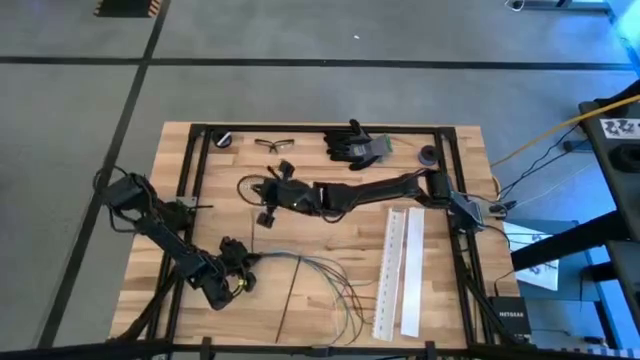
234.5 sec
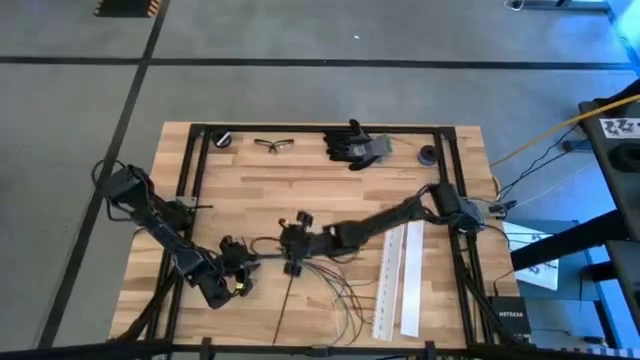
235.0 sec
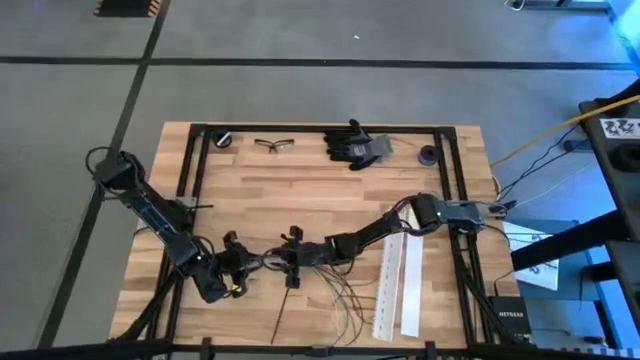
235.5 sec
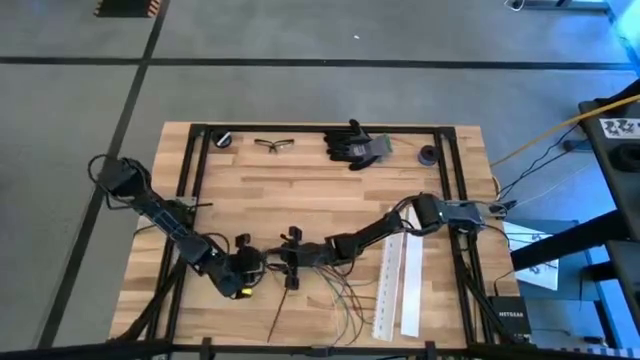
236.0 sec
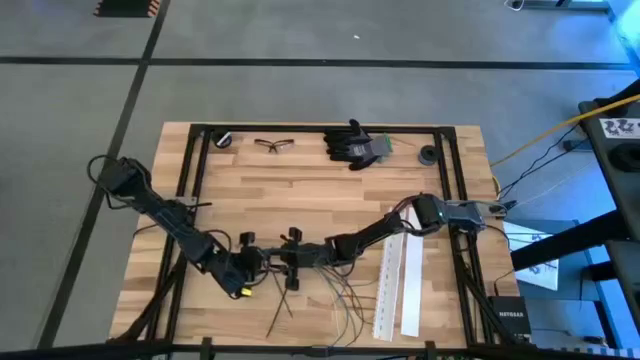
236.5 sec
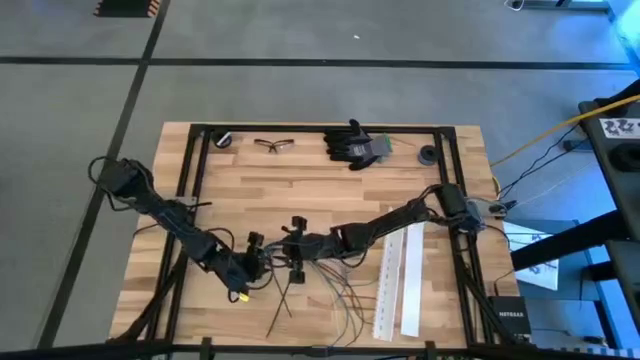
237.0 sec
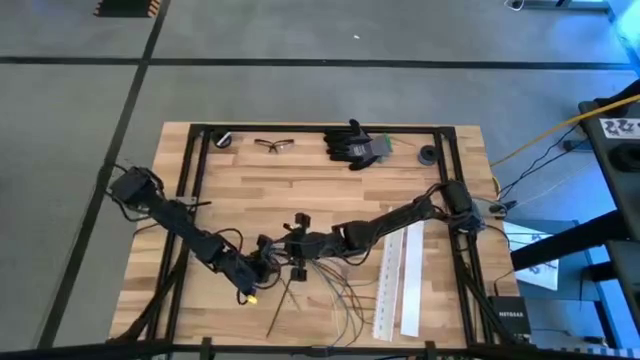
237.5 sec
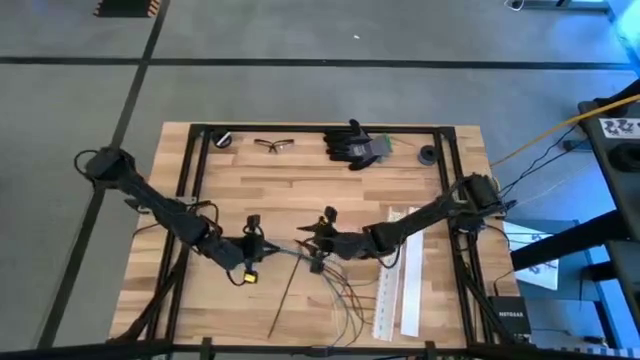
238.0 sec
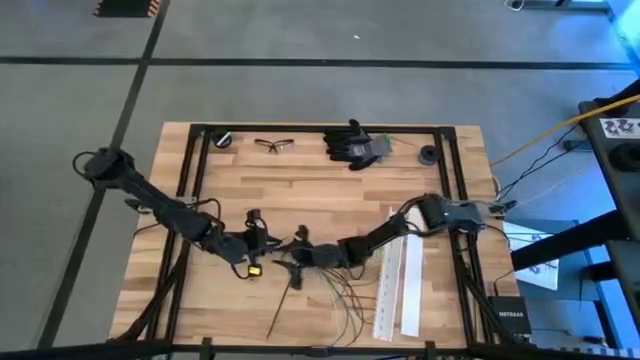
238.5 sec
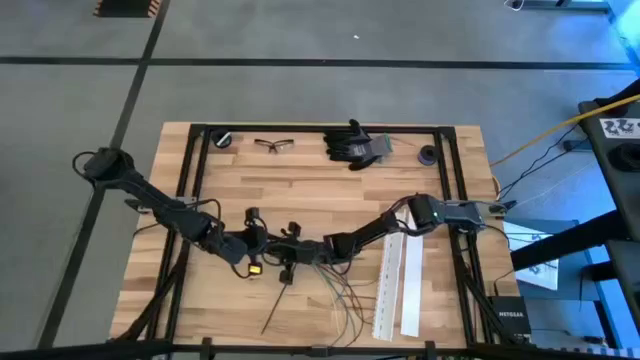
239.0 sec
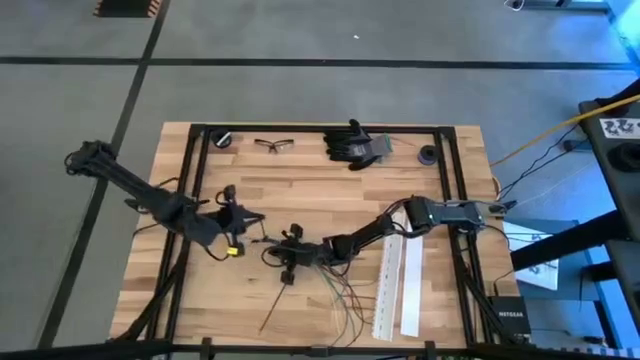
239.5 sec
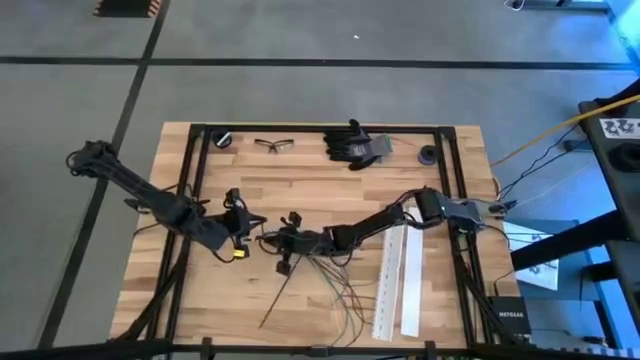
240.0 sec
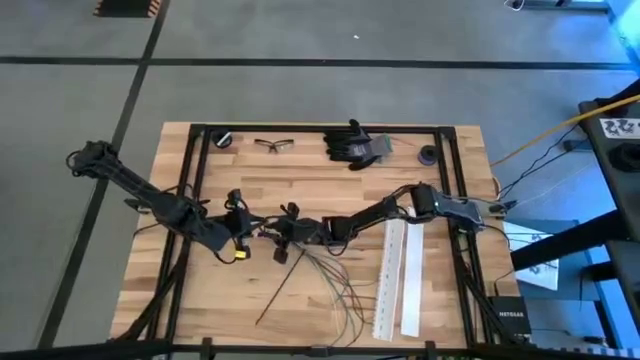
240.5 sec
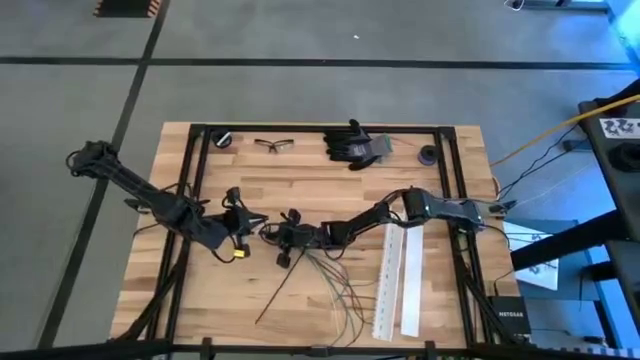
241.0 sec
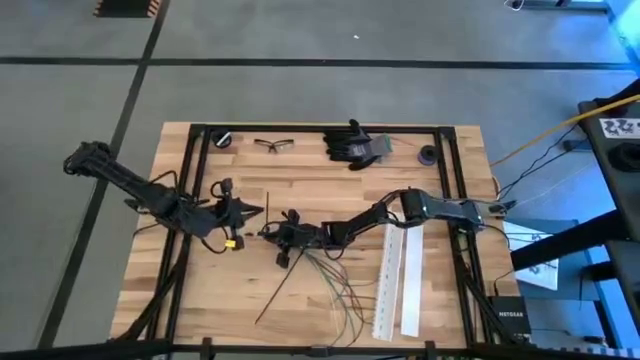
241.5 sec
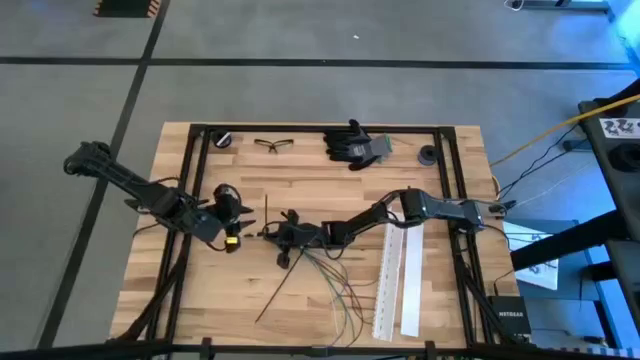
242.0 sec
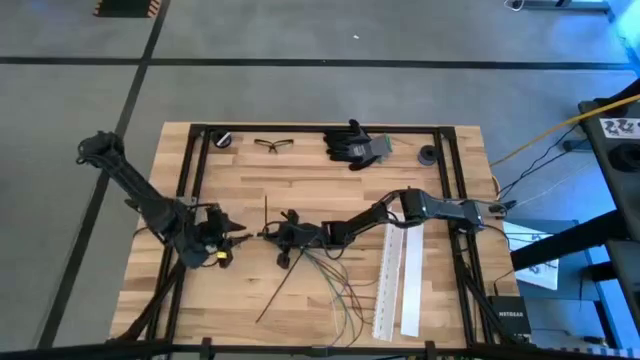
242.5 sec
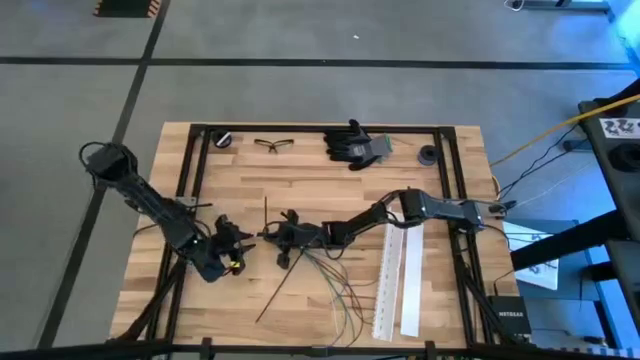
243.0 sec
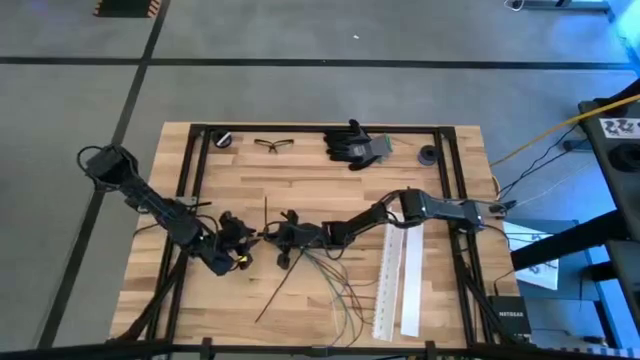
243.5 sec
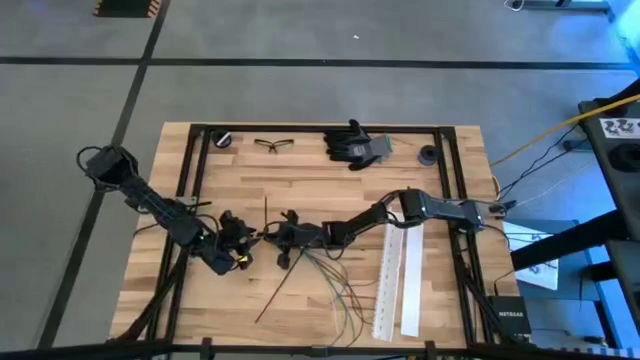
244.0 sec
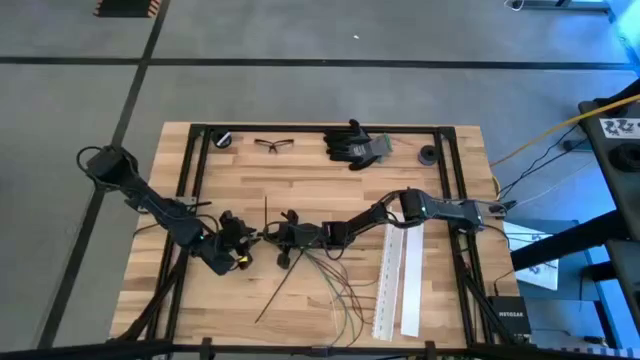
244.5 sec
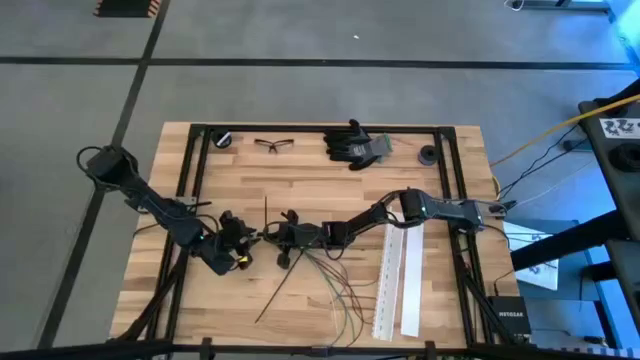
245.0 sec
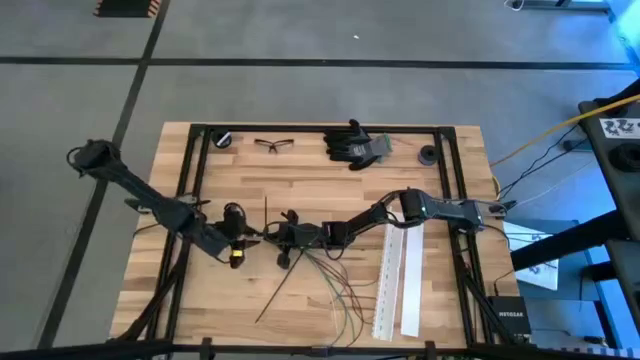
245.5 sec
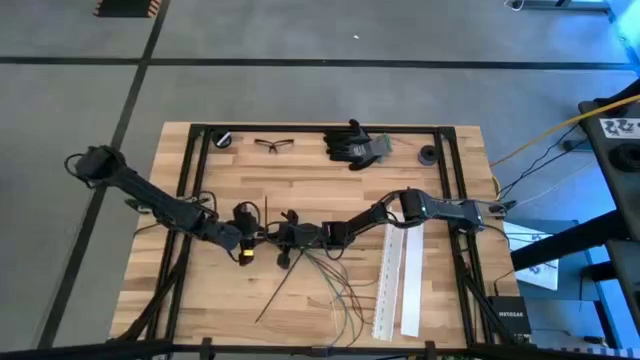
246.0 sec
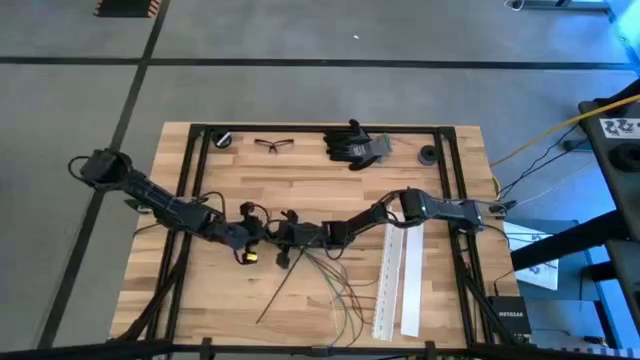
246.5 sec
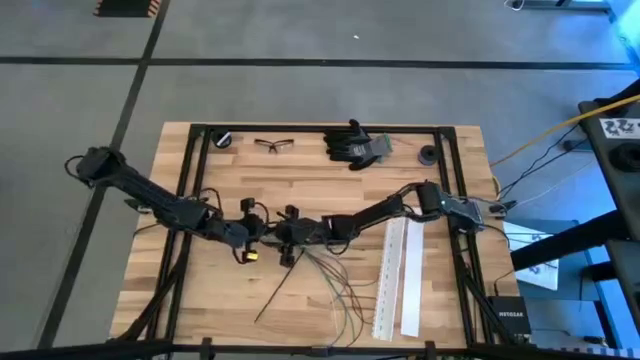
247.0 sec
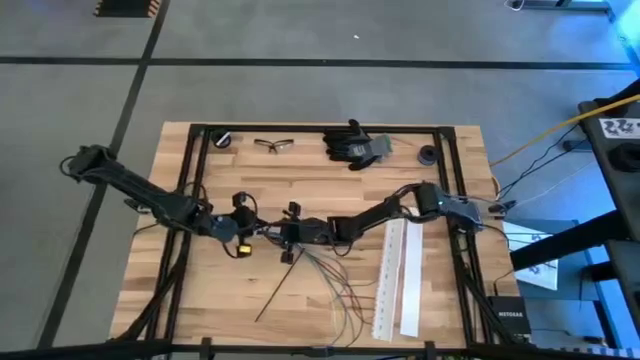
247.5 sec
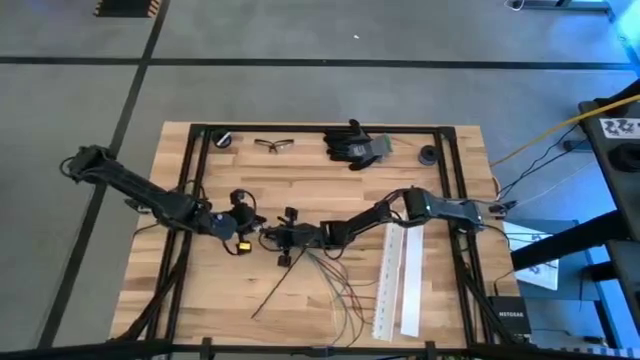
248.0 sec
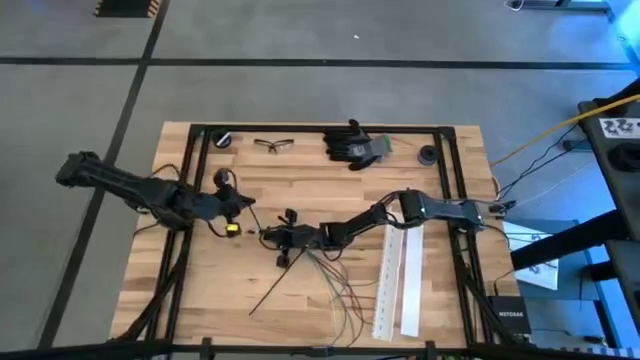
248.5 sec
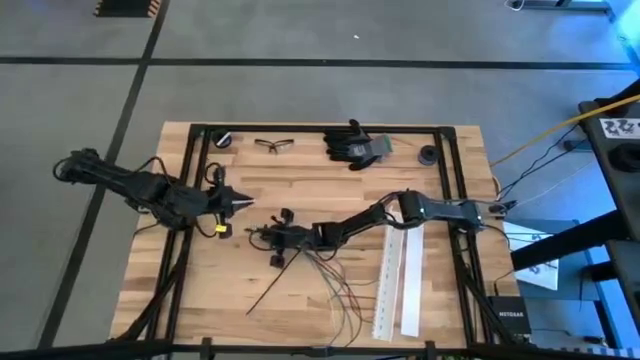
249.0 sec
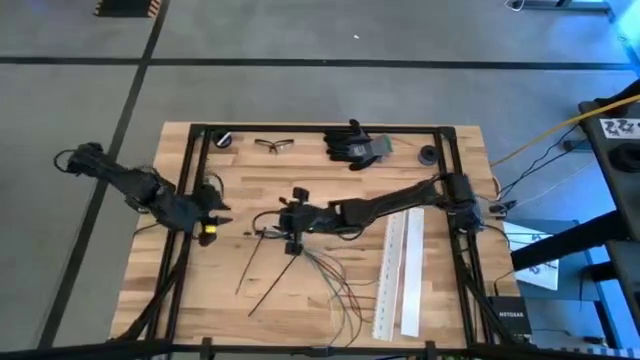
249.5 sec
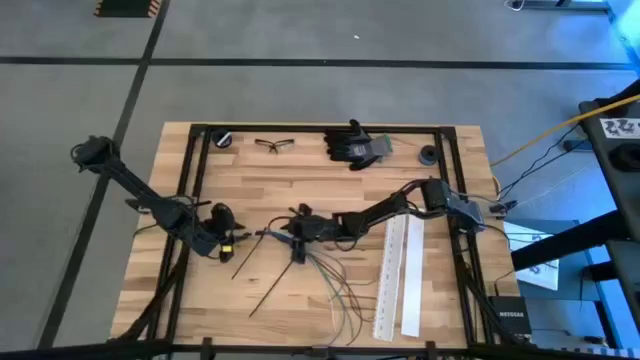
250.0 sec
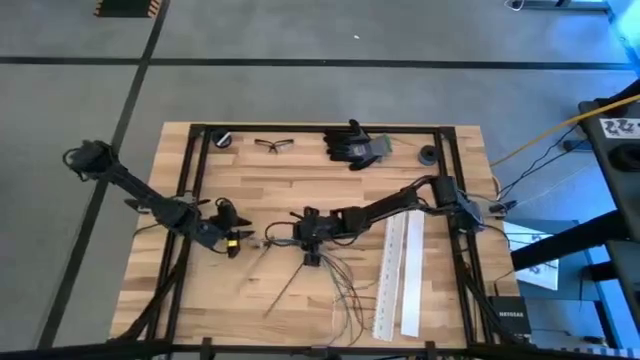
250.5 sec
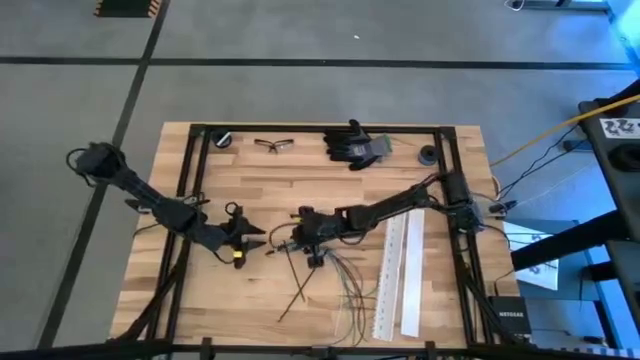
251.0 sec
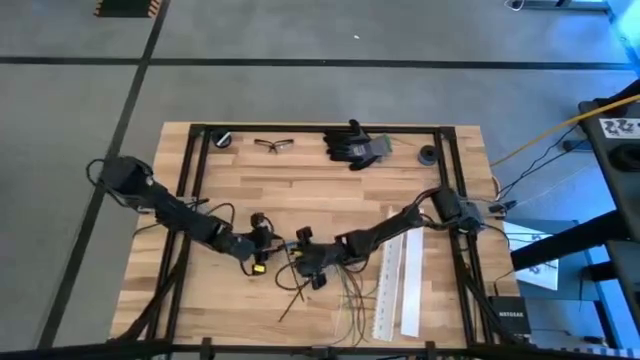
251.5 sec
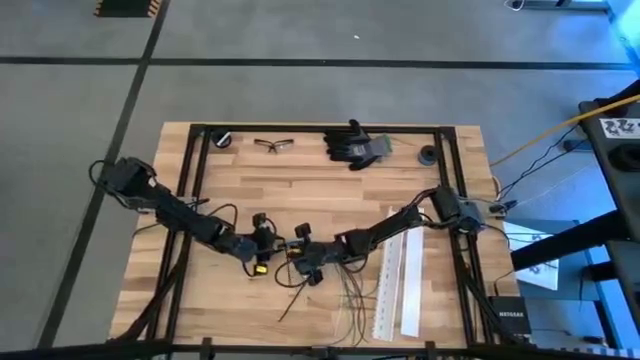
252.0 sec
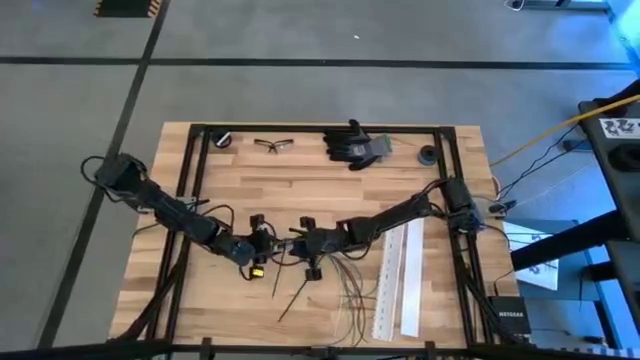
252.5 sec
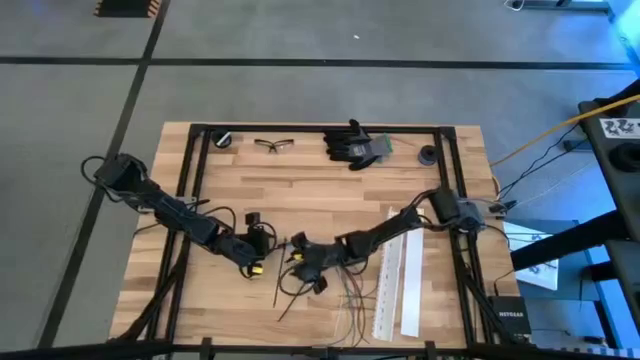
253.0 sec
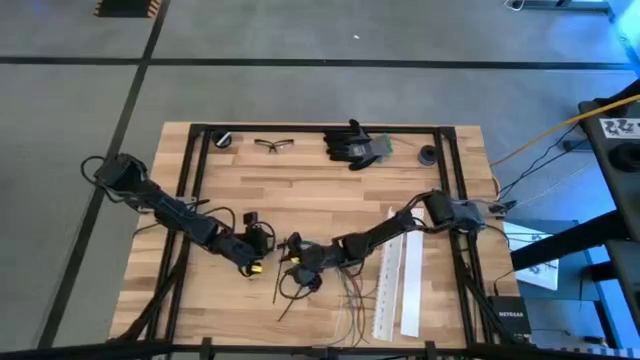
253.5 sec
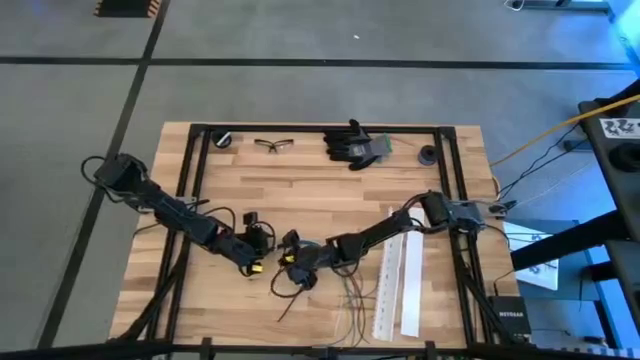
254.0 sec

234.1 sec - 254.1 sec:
Task: Ziptie cables
Wrap the zip tie on the cables

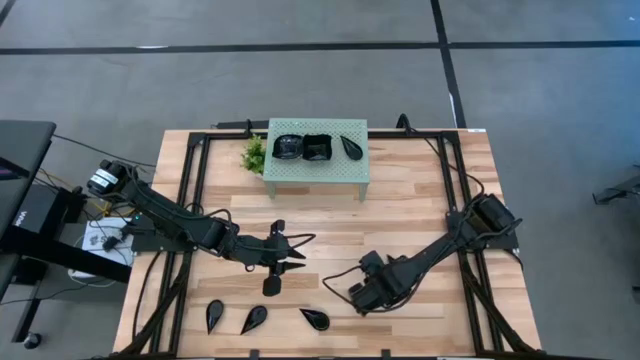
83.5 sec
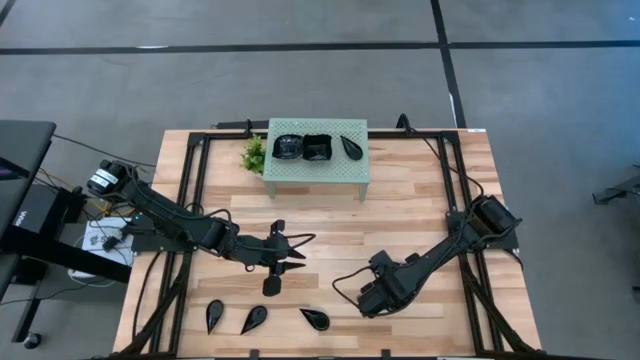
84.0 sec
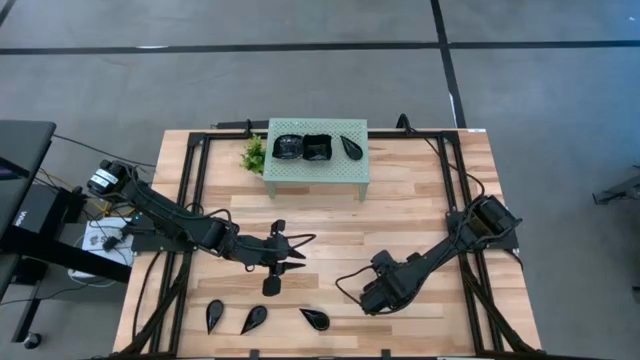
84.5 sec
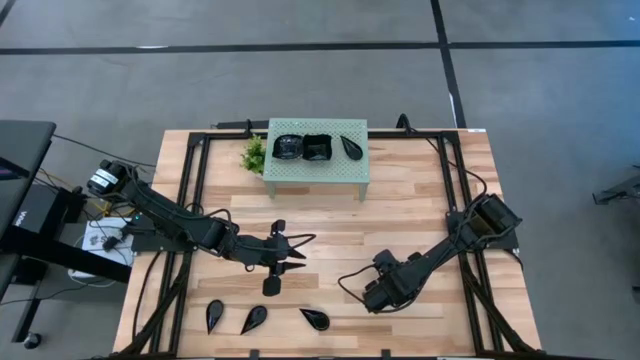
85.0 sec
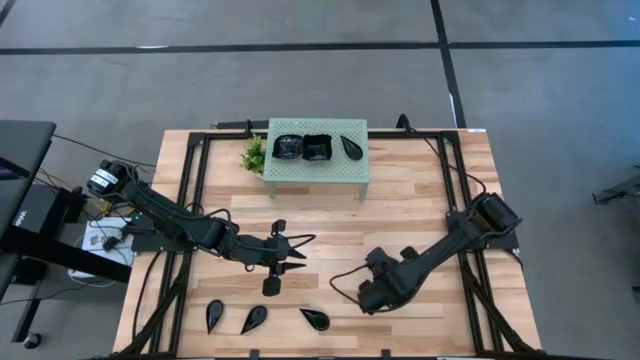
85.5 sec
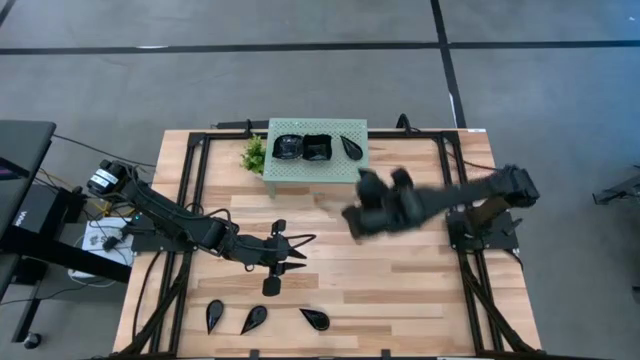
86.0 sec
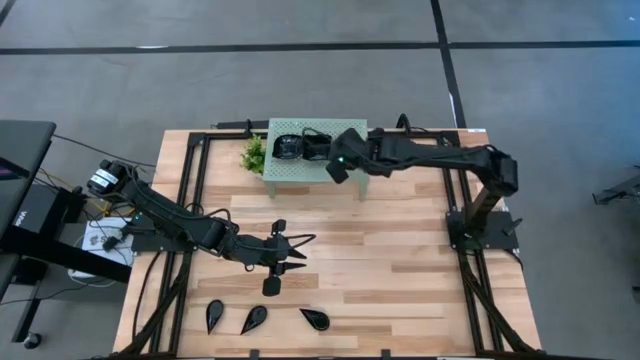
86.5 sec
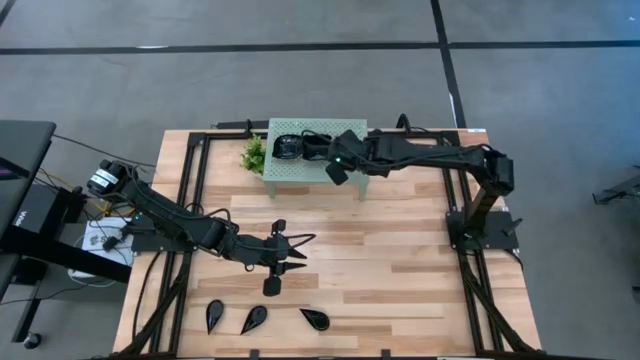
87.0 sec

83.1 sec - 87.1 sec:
Task: Pick & Place Mini shaped plates
Stack the drop-shaped plate on top of the other drop-shaped plate on the shelf
